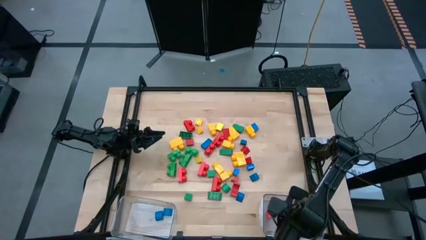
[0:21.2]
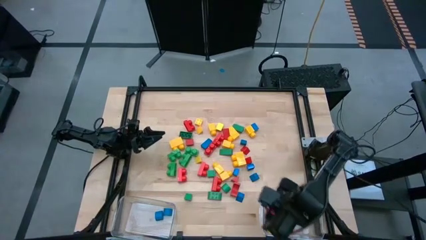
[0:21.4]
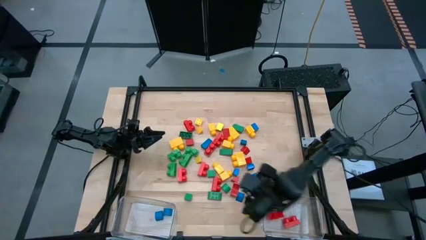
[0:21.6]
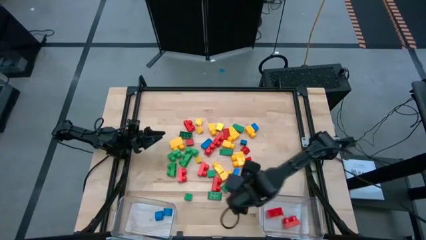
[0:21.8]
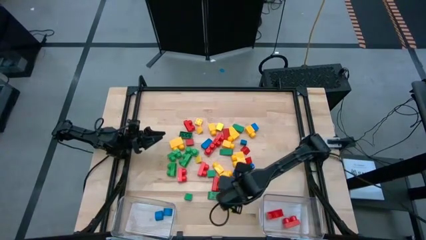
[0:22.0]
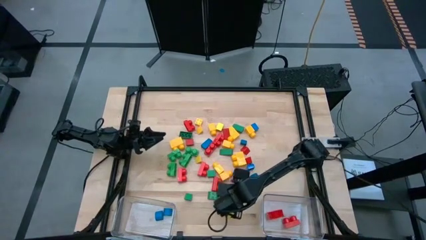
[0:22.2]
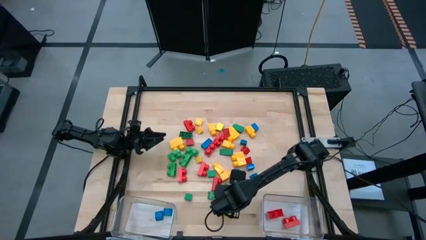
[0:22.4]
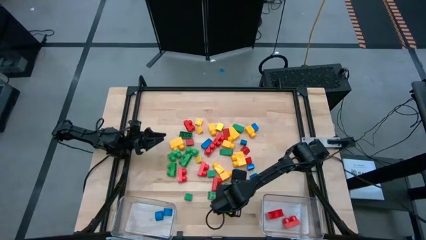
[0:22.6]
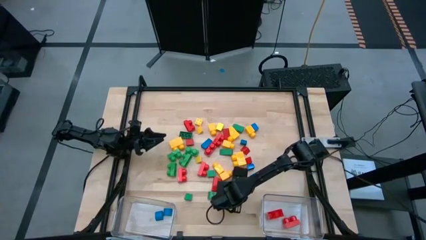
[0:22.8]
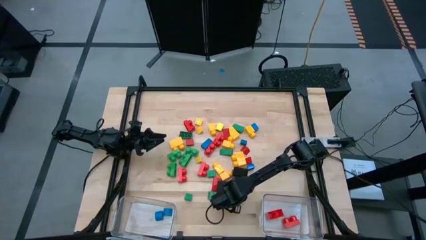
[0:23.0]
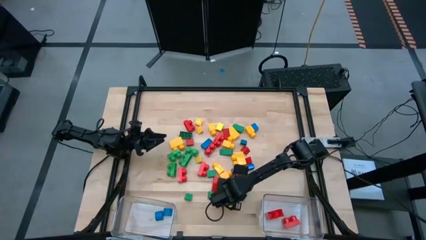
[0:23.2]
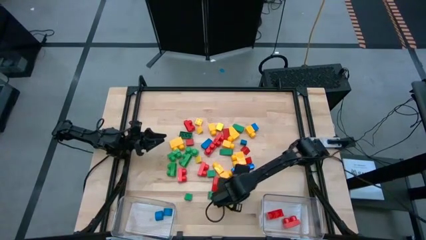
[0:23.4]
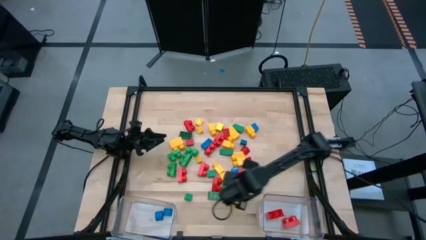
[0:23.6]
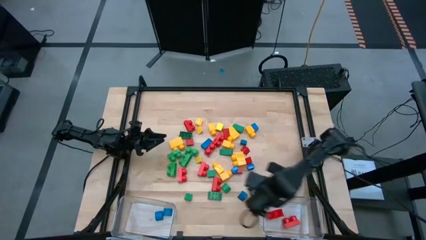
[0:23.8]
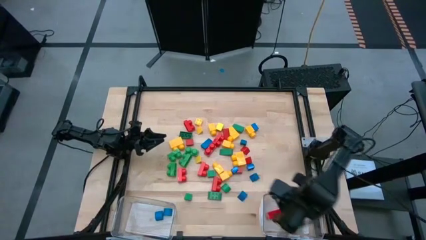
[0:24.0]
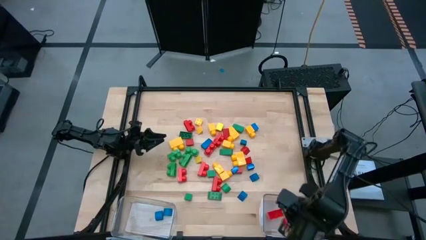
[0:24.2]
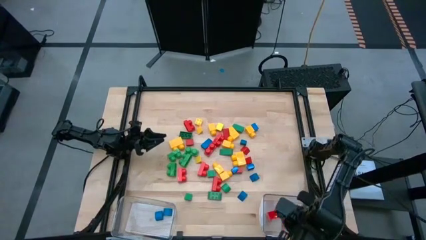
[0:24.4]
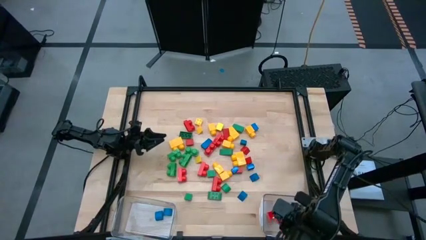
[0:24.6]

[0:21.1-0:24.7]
Task: Sort blocks by size
Put the red arch block into the right transparent bin

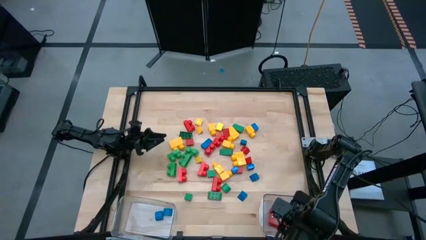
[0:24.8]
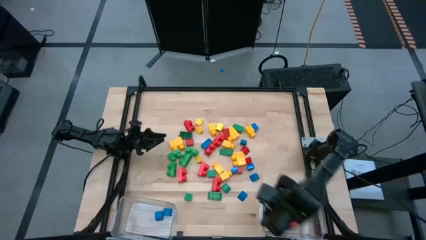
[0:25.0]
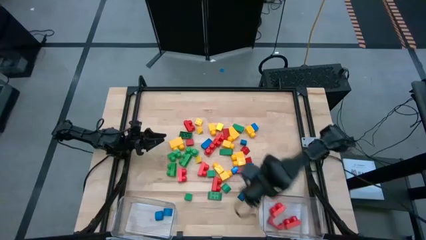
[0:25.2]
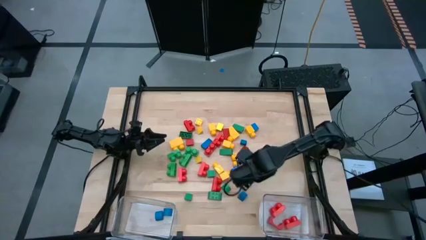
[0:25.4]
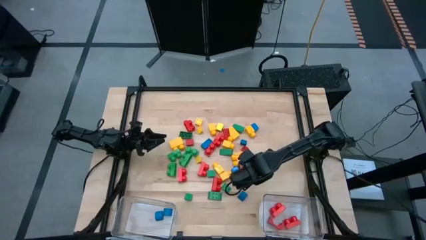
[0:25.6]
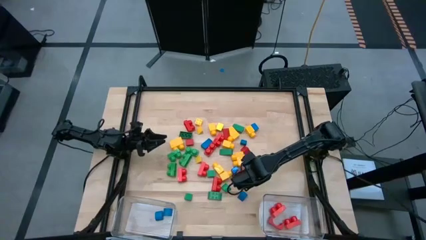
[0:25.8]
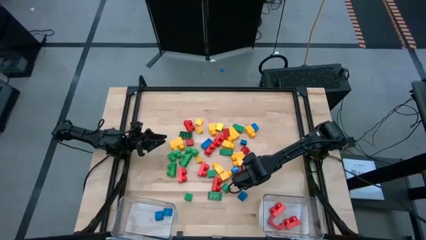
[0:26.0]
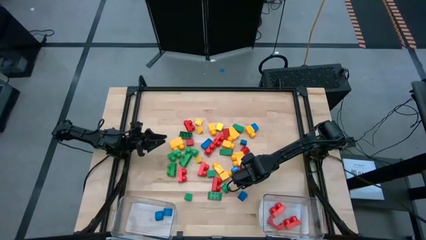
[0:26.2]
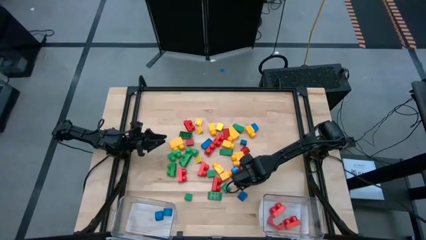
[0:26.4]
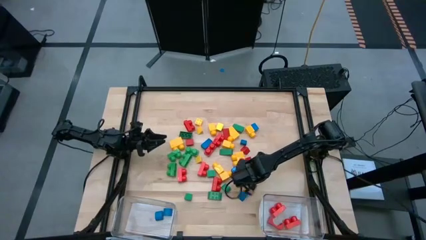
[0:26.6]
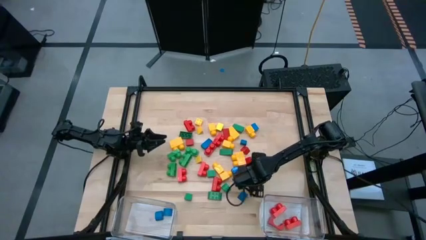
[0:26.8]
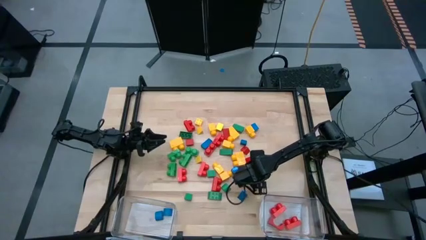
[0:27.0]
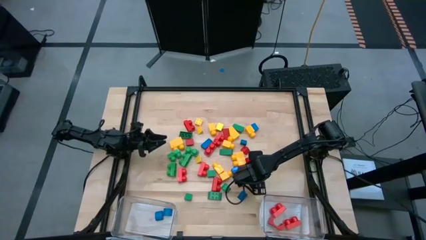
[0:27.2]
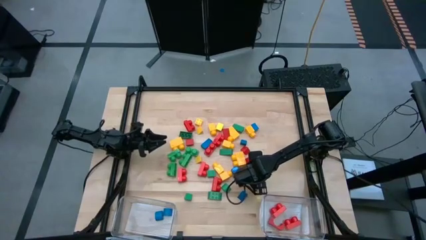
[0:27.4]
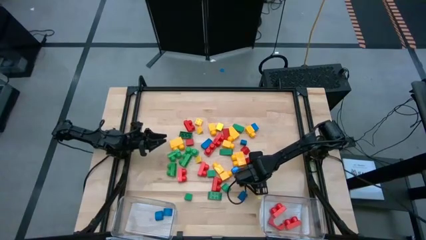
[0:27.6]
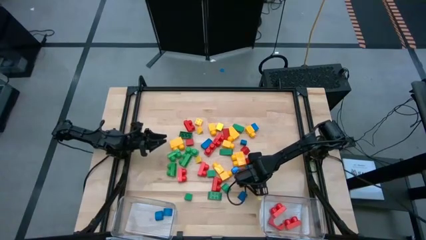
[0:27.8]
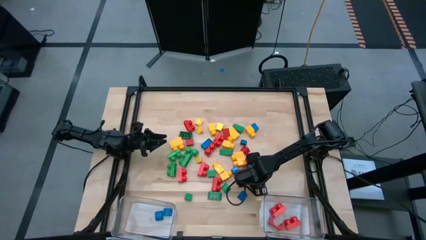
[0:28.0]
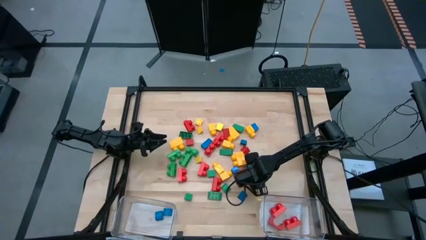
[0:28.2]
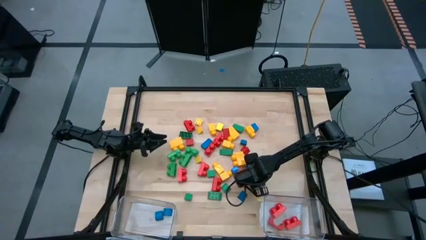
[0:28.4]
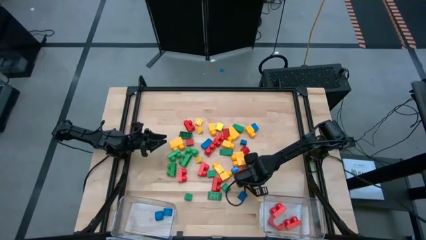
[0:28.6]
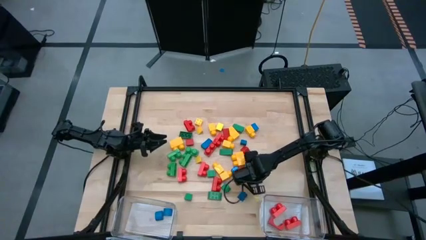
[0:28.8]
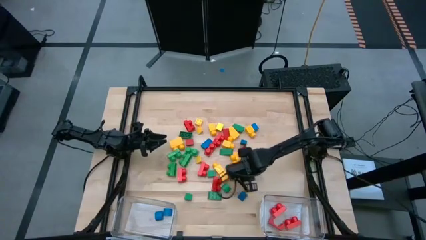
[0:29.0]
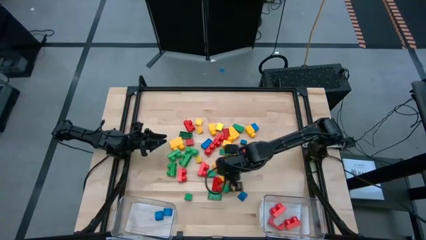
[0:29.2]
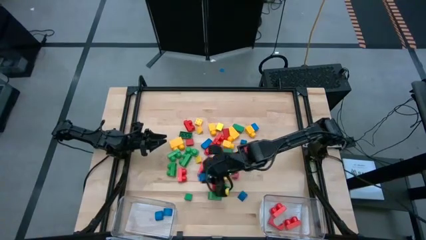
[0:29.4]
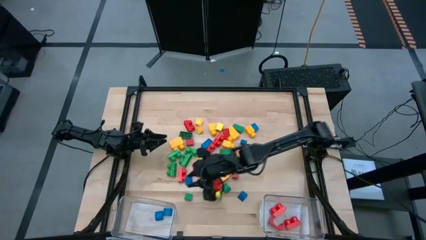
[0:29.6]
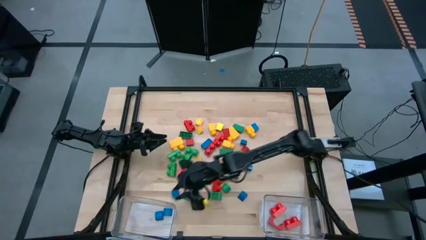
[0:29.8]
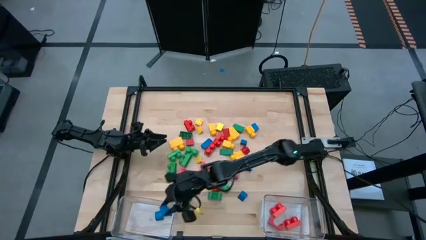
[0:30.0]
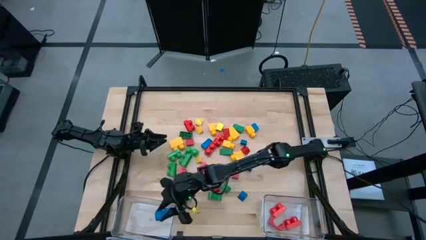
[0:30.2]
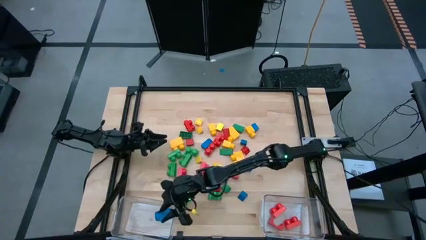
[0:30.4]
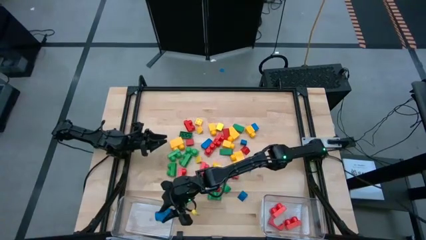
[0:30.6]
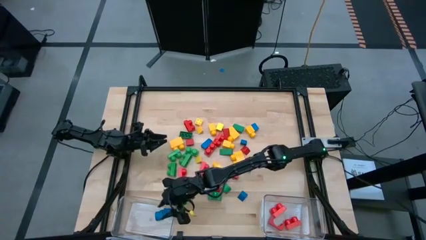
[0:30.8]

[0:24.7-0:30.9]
Put the blue triangular block into the left transparent bin

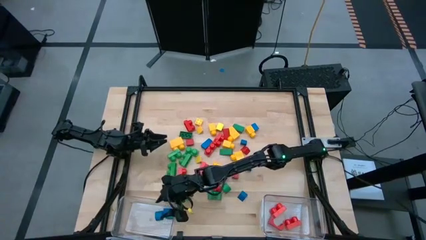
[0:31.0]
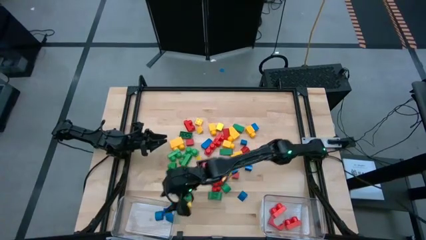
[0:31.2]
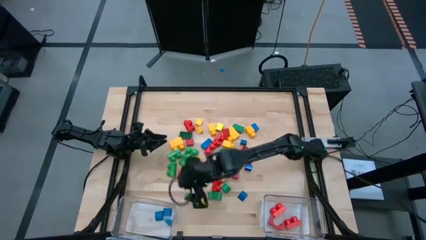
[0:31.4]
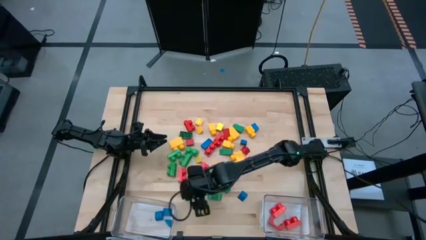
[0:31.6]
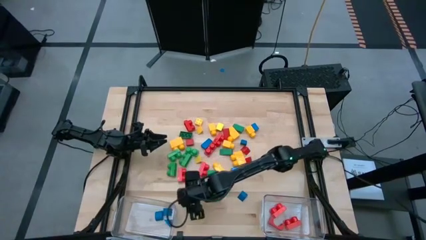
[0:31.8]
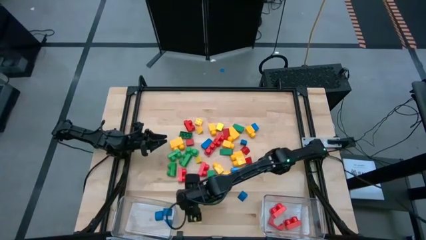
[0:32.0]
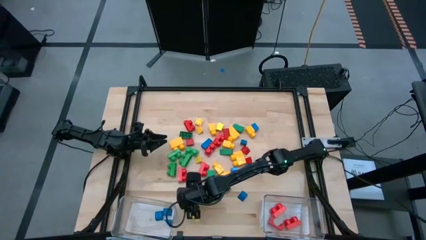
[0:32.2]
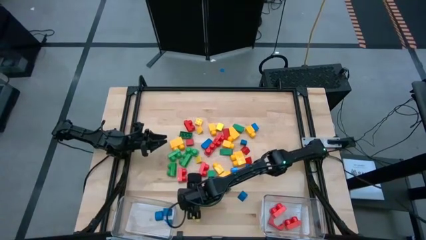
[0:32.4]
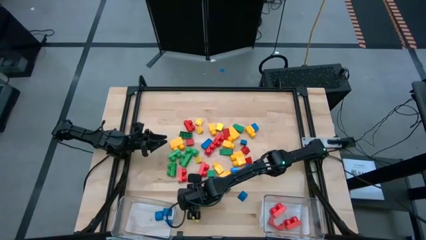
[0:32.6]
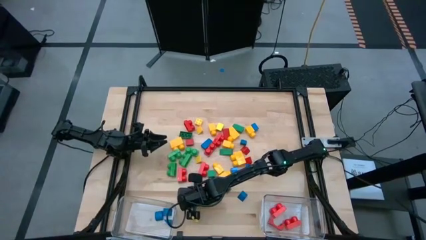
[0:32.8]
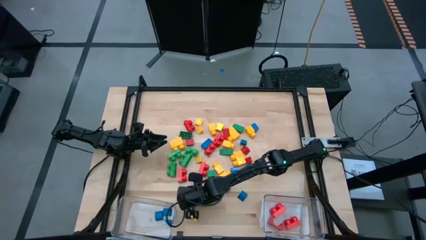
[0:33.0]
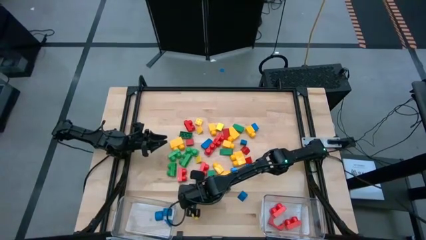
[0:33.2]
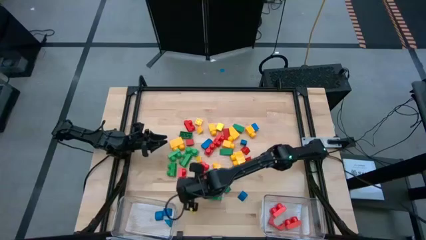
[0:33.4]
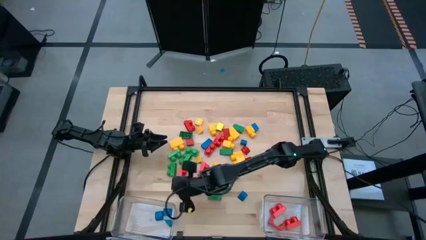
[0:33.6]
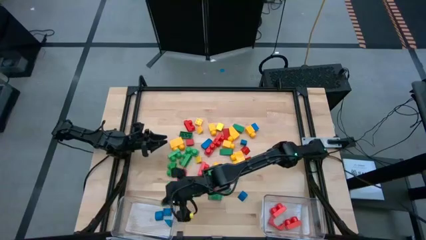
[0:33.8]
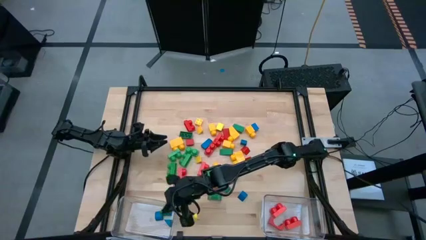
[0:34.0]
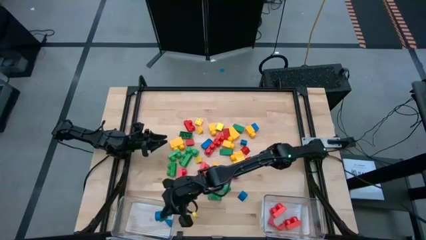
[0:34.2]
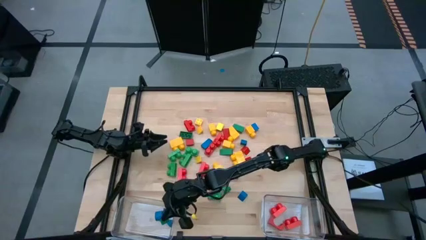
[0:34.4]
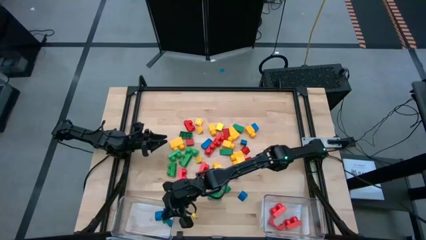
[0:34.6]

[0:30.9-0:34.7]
Put the green triangular block into the left transparent bin

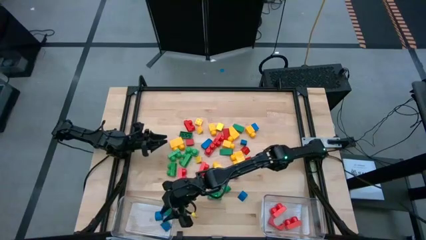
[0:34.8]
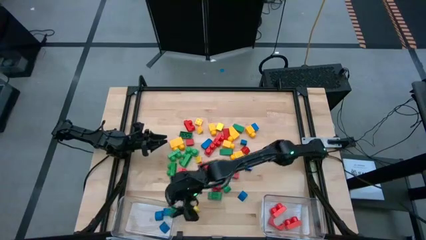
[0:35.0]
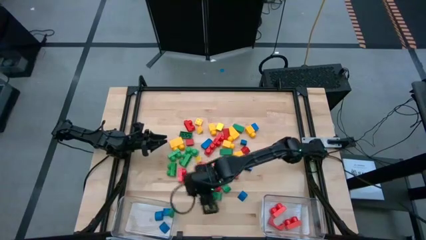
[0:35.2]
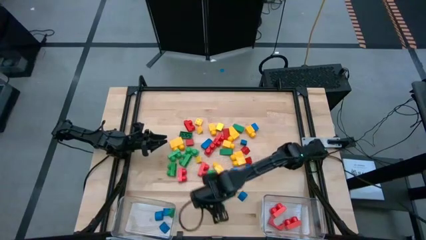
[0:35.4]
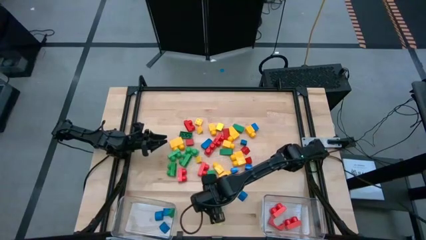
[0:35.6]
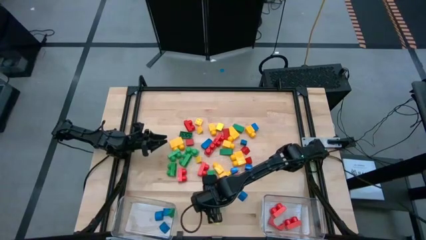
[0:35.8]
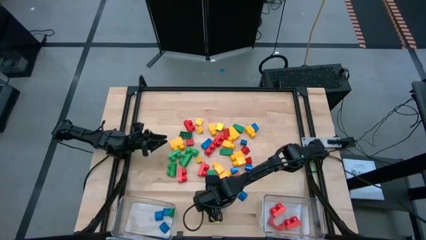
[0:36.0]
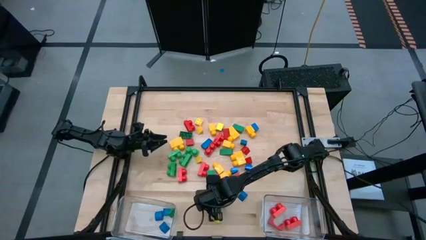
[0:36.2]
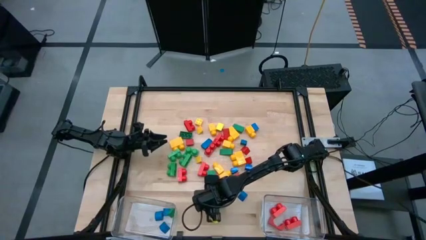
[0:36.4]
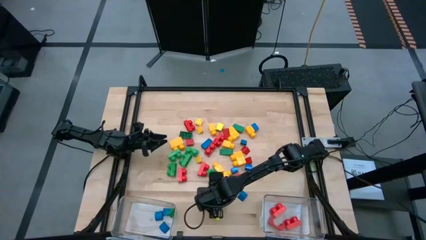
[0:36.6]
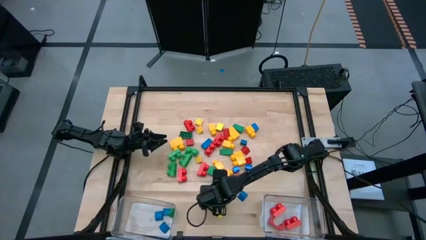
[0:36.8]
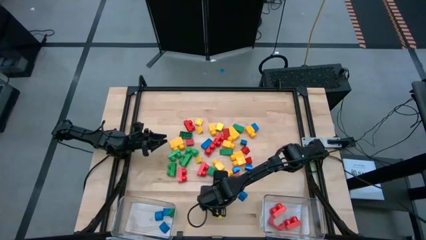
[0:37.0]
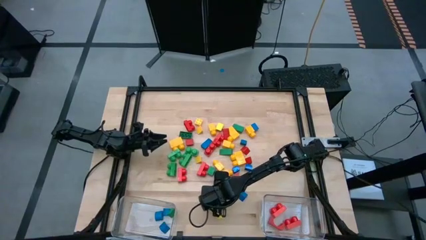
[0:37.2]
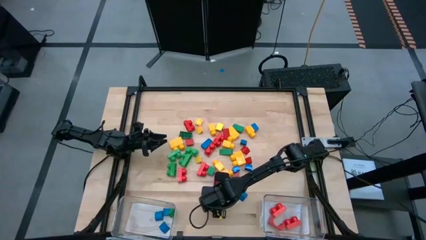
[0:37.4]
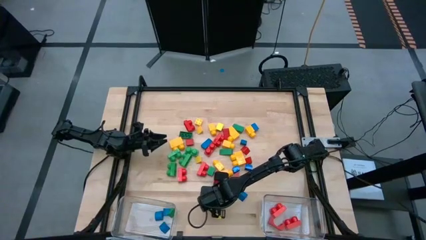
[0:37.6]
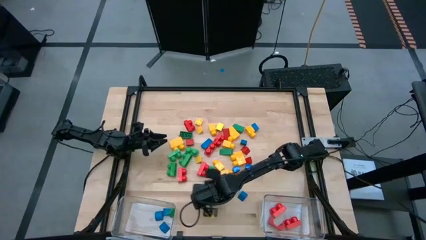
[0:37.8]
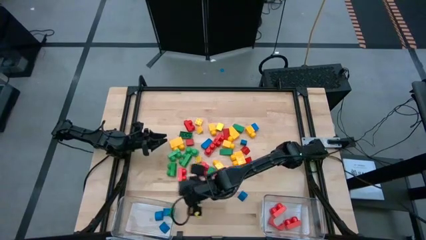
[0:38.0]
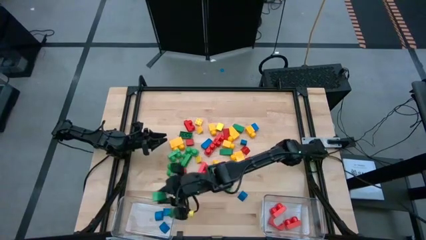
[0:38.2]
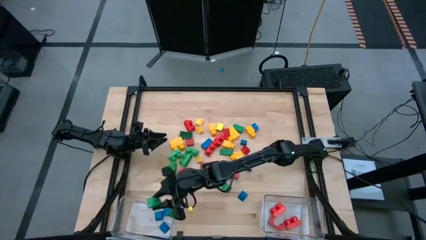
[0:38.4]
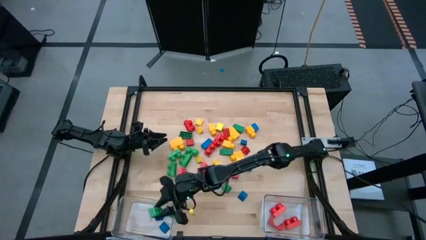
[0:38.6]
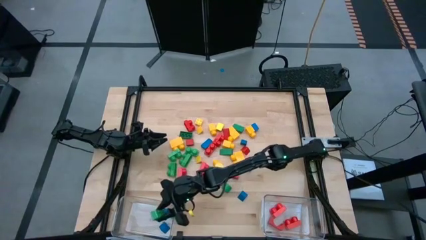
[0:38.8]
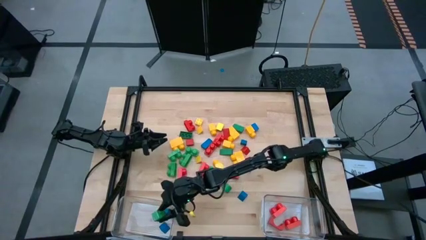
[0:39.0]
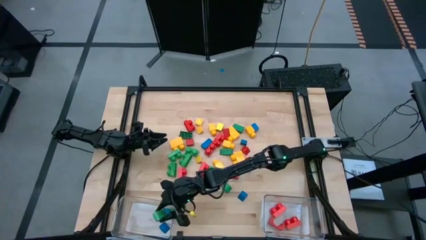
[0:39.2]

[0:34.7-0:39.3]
Put the green game piece into the left transparent bin
